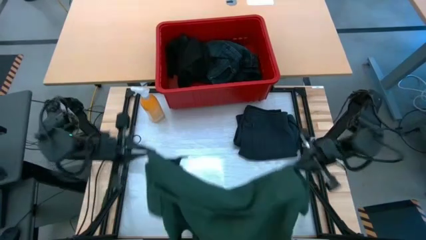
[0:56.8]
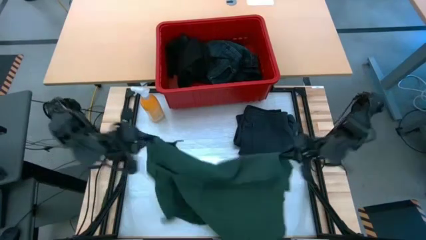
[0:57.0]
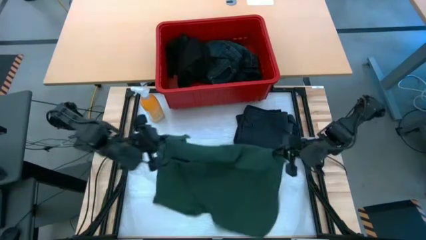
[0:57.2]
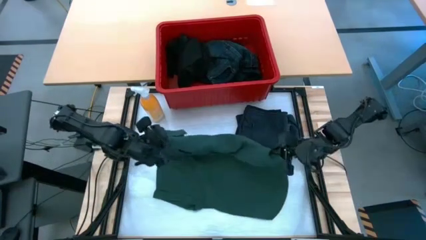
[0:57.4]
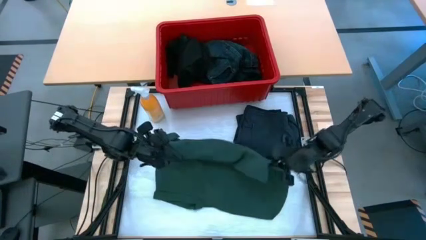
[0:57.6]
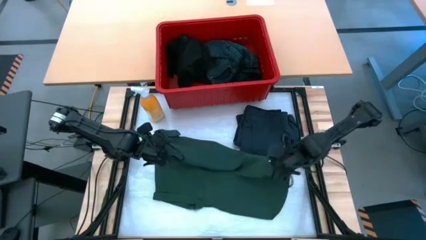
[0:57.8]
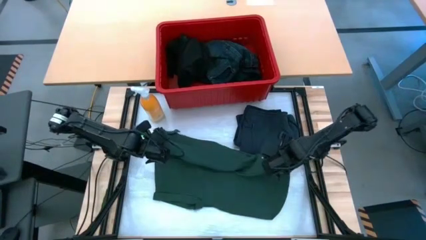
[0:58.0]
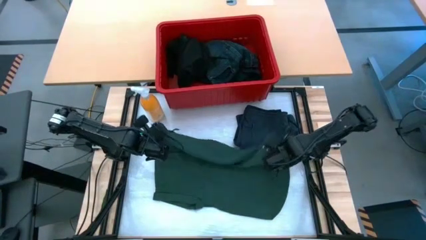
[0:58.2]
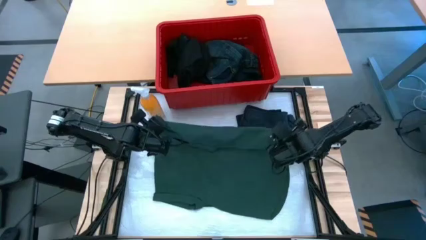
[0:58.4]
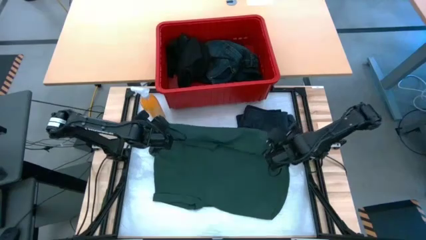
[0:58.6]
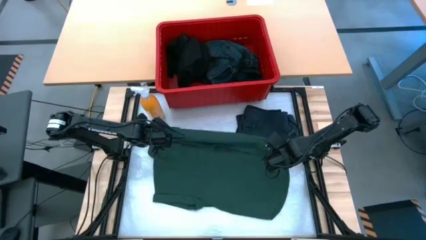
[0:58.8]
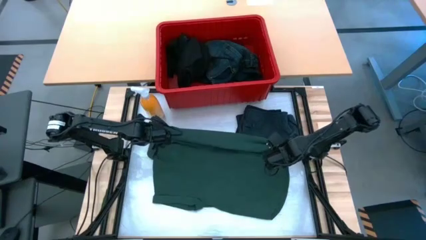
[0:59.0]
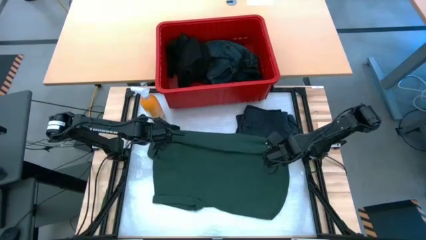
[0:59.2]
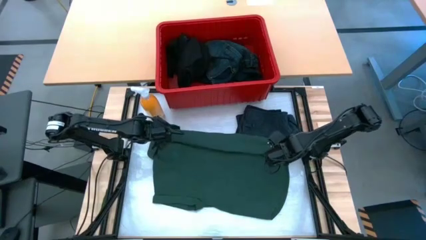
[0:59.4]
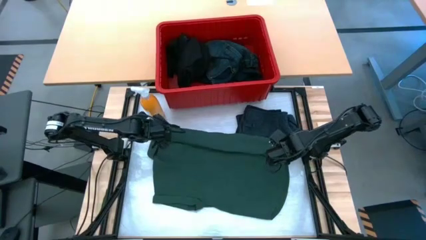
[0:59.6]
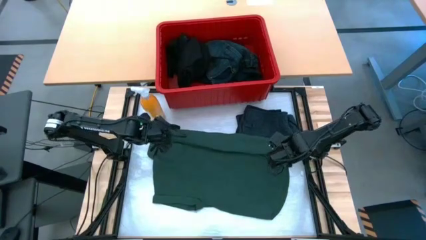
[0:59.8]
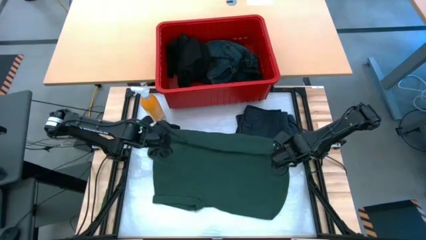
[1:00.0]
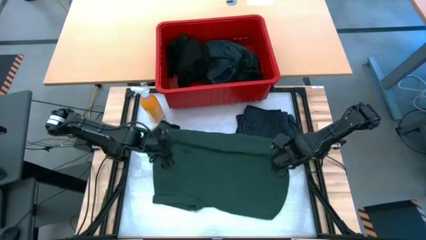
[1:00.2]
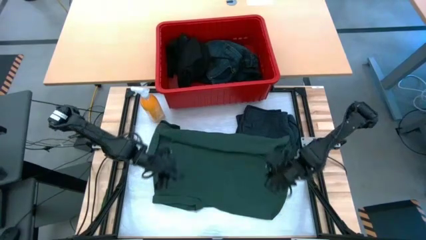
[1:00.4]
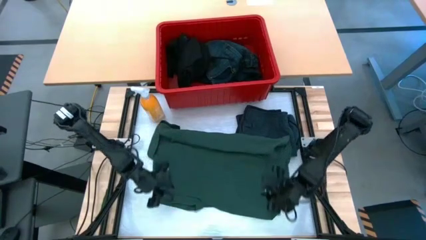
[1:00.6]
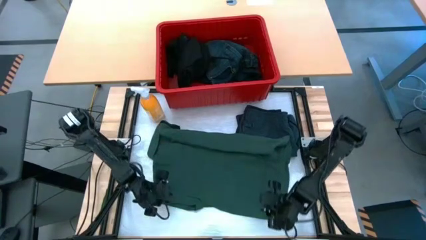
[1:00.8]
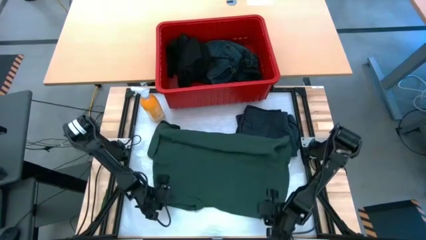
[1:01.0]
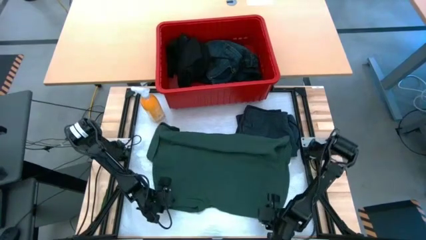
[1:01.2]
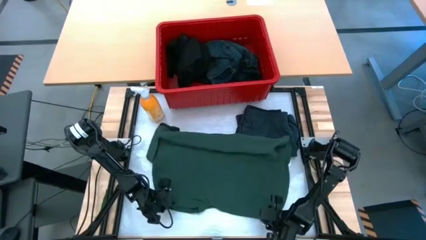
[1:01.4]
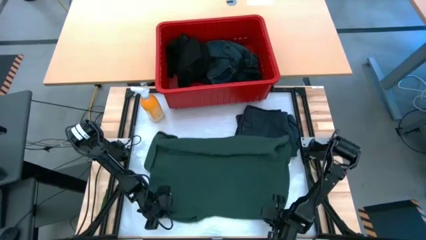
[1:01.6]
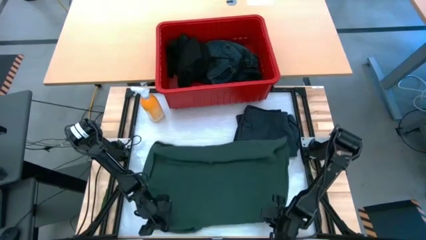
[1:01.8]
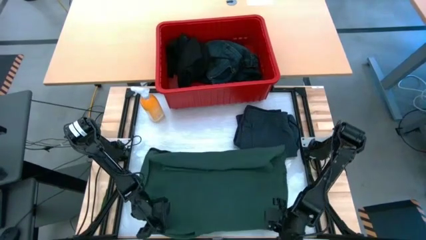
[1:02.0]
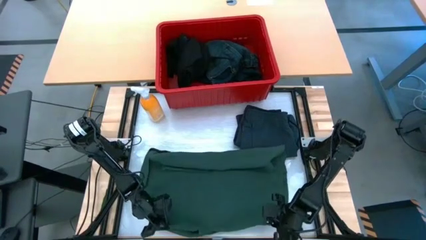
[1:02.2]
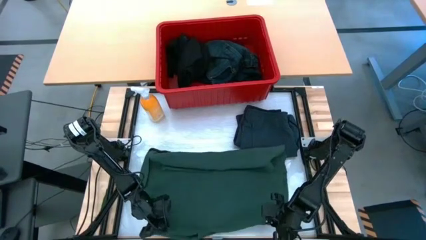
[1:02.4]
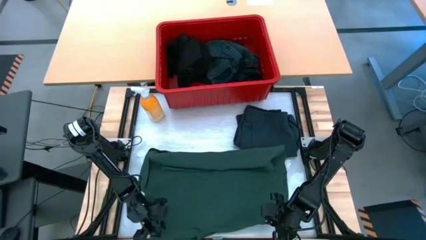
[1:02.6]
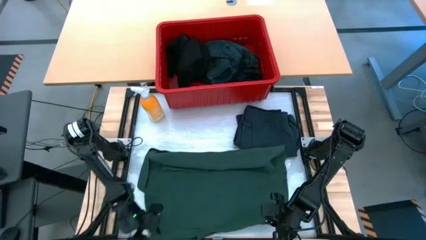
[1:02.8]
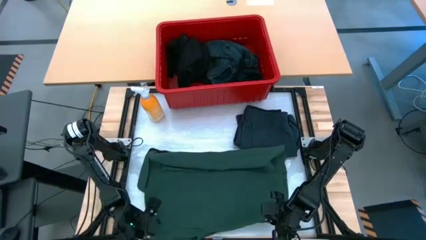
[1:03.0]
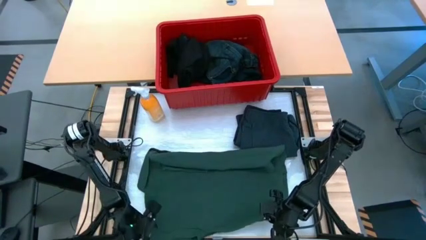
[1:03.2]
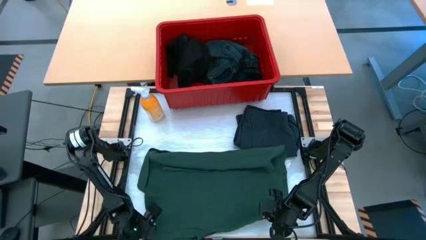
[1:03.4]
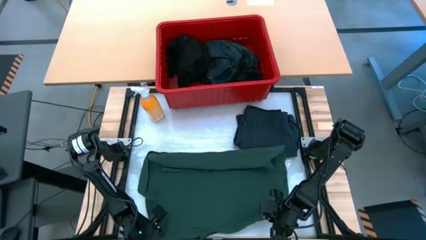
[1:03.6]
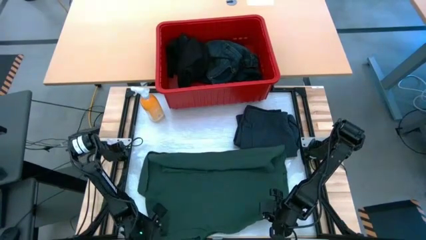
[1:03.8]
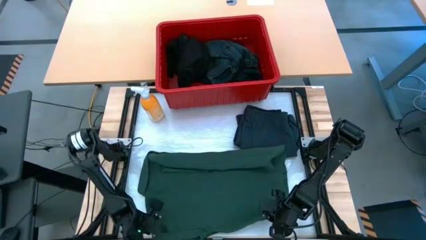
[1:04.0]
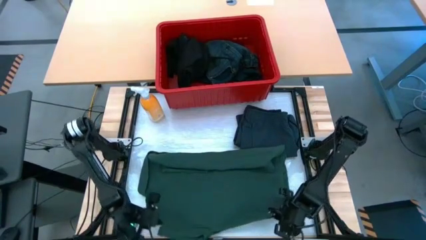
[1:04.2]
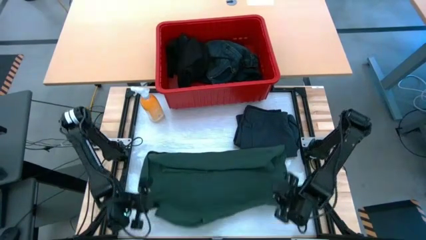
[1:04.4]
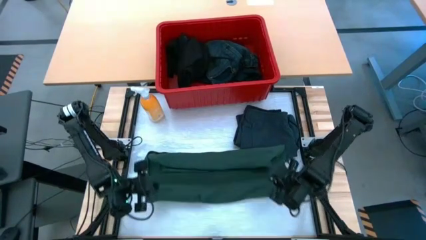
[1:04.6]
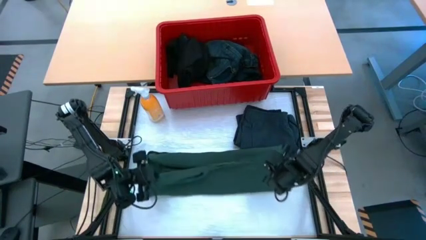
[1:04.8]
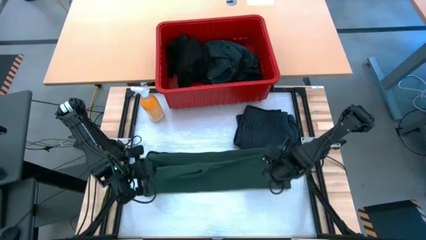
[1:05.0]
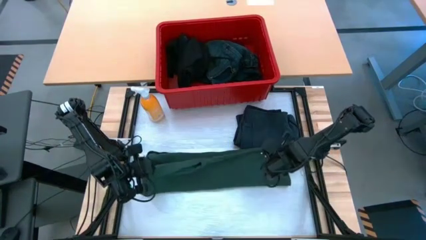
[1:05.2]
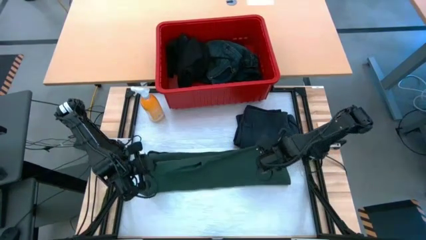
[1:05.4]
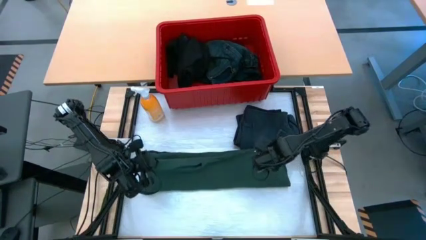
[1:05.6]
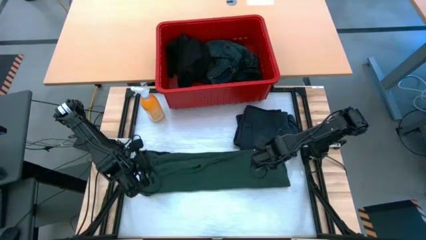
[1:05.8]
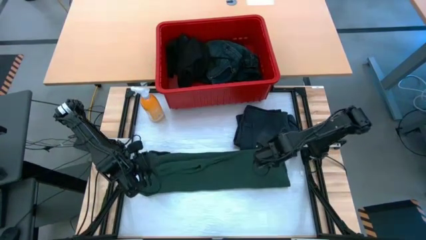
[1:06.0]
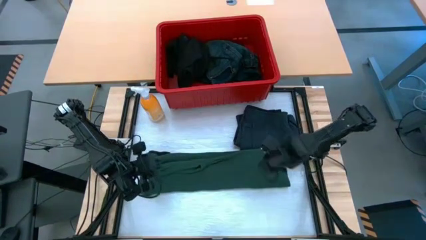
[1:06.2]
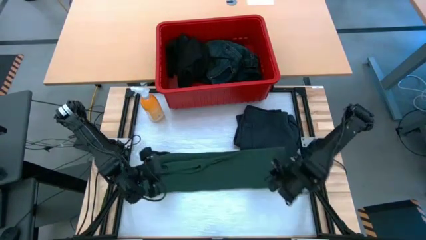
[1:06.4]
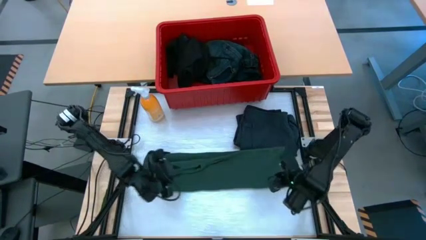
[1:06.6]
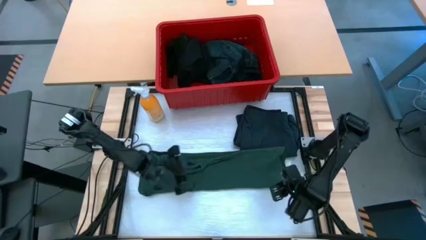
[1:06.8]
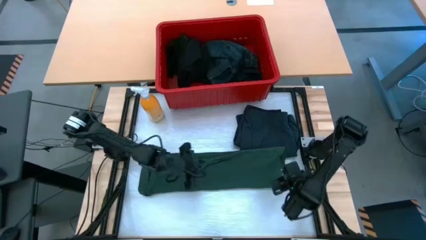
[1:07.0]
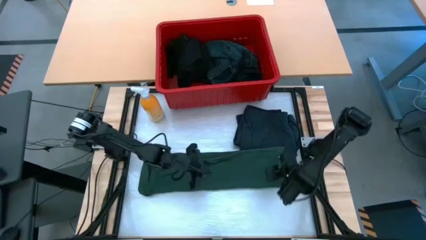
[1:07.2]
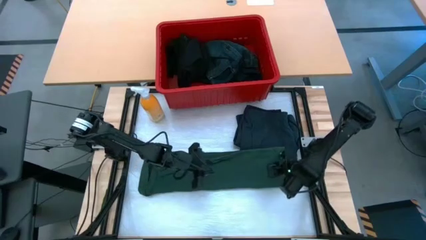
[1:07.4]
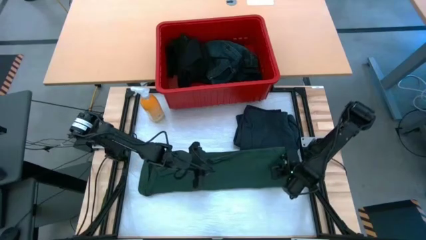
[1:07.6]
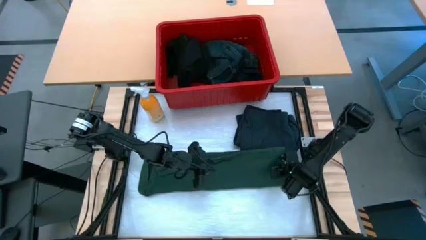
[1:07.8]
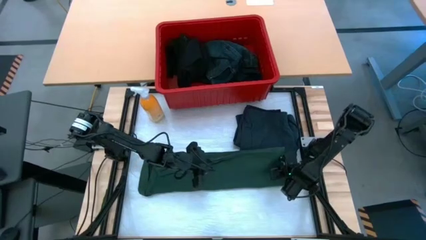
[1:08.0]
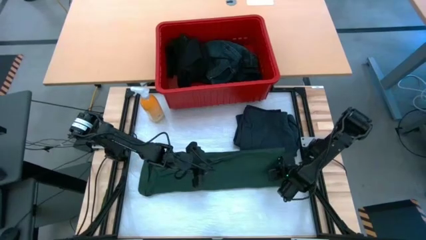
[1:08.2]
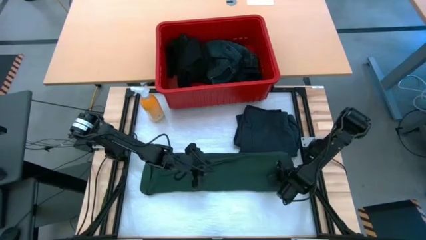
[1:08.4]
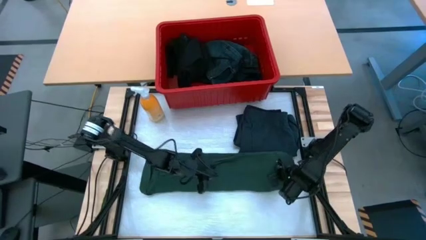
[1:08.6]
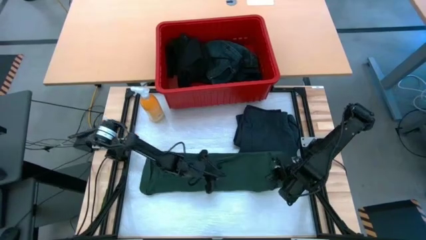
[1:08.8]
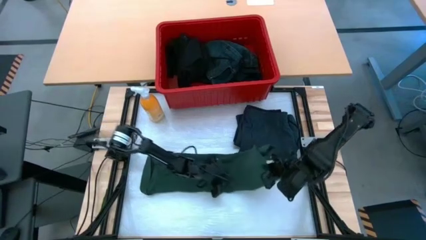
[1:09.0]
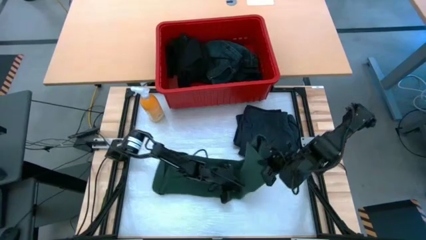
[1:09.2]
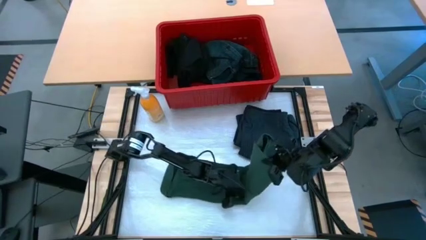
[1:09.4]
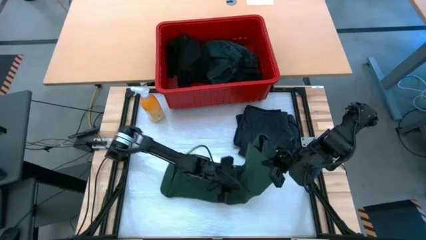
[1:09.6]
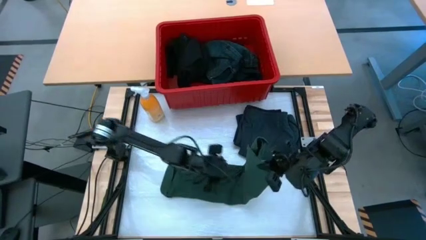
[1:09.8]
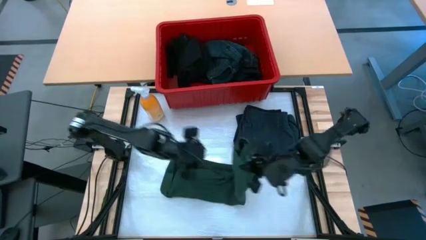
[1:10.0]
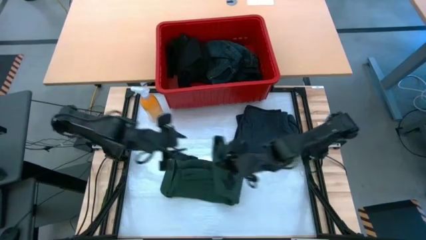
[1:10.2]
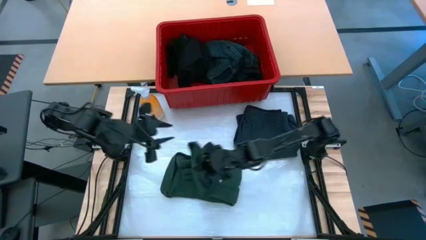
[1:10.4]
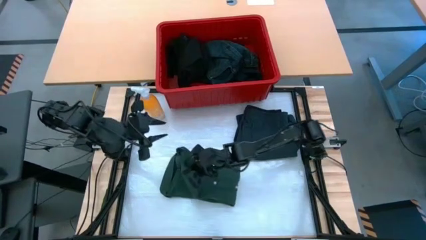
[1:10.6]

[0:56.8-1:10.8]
Task: Fold Laundry from Bin
Fold the green polo shirt from the bin

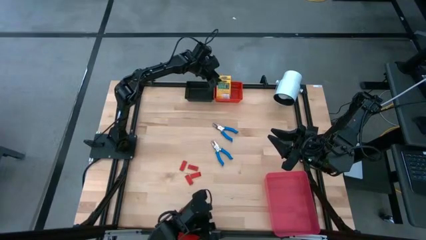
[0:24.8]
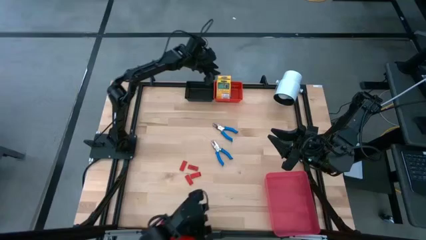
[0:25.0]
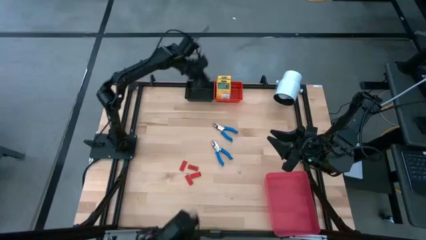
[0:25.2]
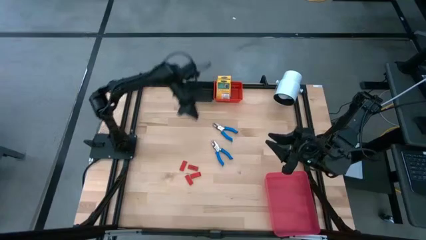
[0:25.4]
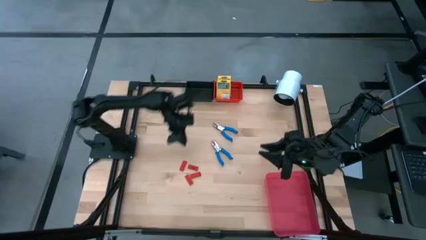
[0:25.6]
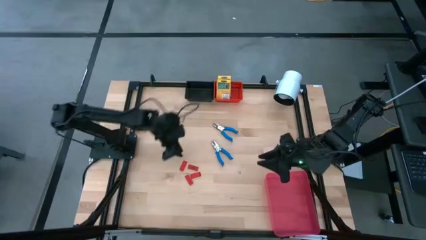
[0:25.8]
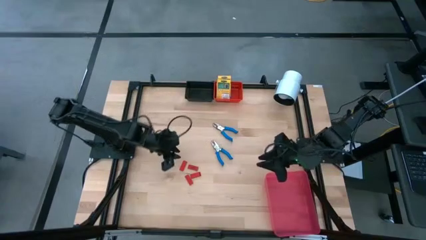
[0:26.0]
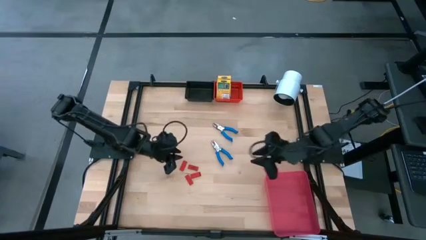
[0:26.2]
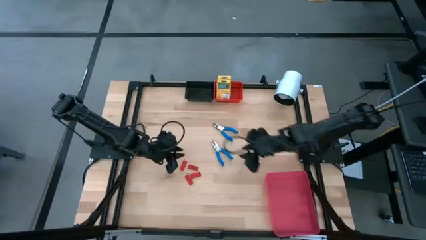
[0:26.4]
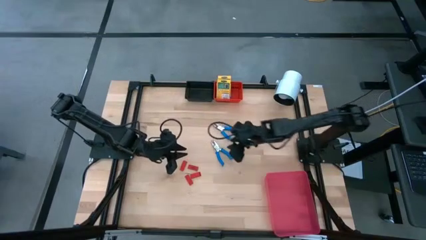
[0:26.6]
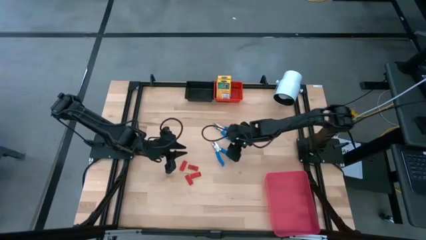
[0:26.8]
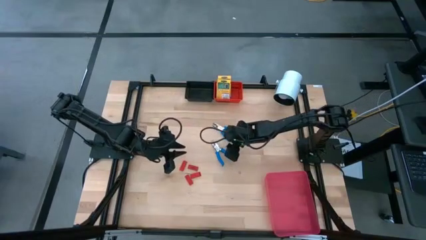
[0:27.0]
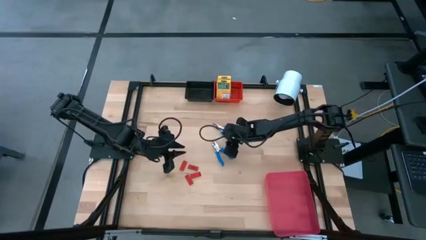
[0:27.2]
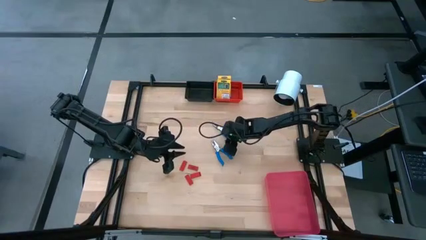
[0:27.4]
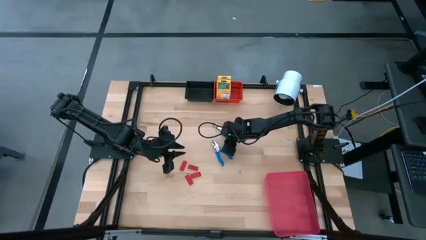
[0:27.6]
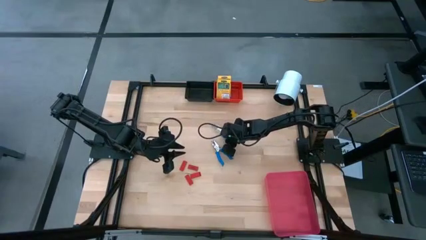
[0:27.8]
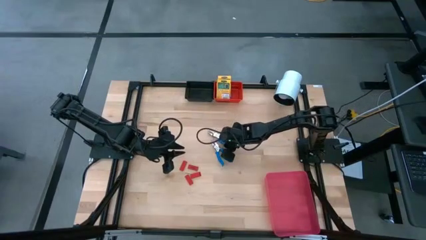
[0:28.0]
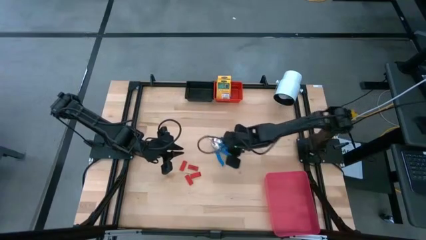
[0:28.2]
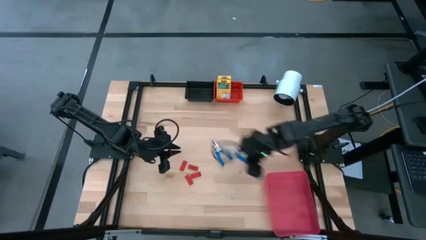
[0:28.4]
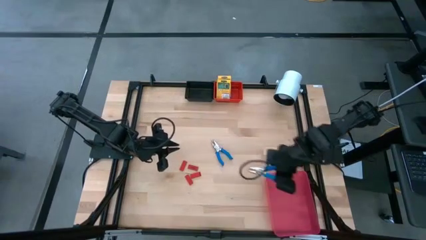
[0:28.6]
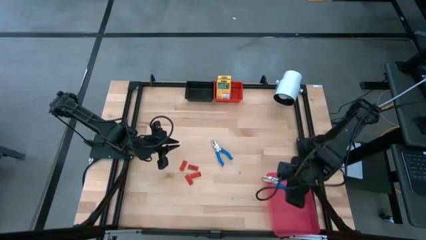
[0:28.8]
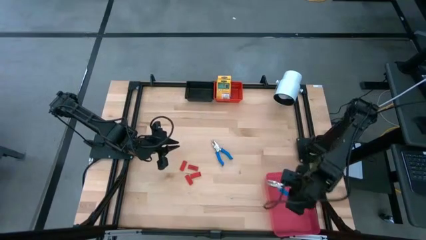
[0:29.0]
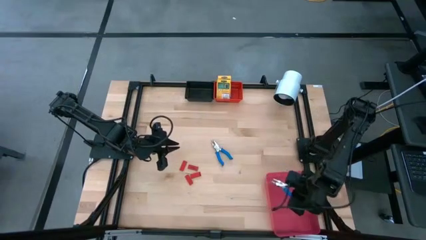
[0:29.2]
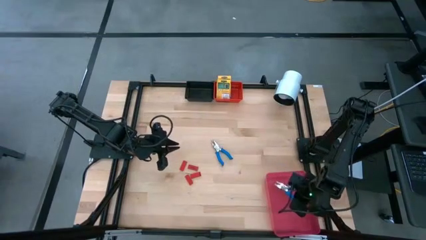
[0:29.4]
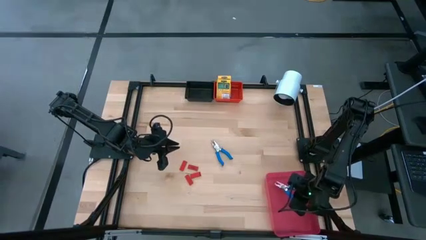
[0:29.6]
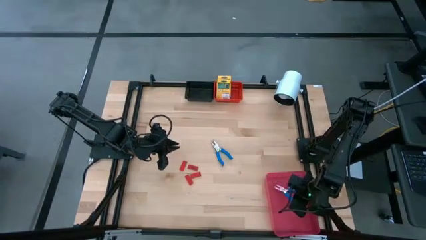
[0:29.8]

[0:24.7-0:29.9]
Task: Pick & Place School Supplies
Put the blue puncher into the pink bin
